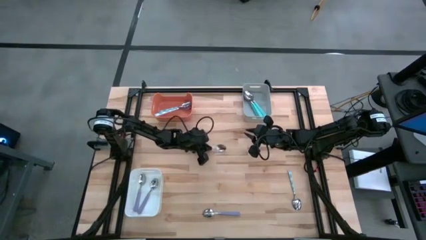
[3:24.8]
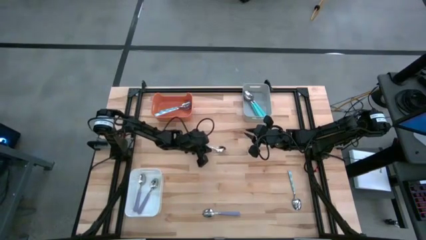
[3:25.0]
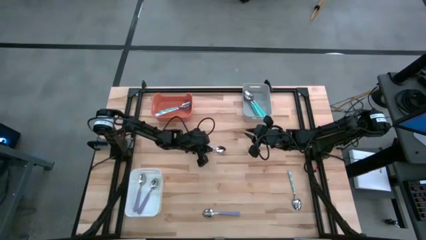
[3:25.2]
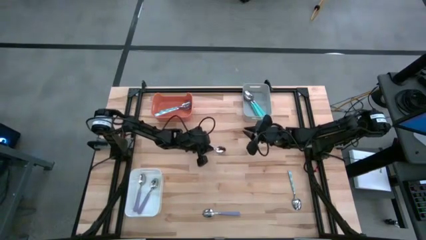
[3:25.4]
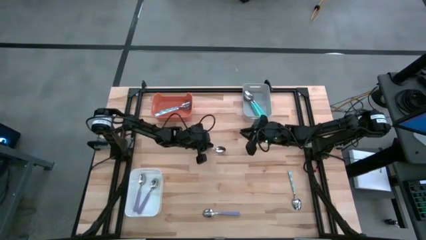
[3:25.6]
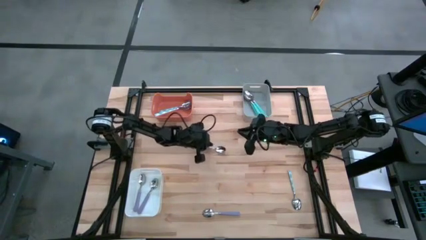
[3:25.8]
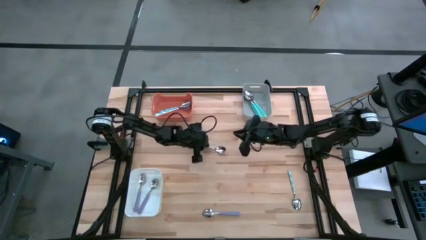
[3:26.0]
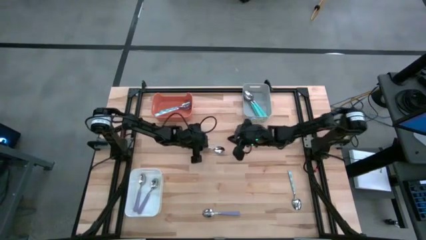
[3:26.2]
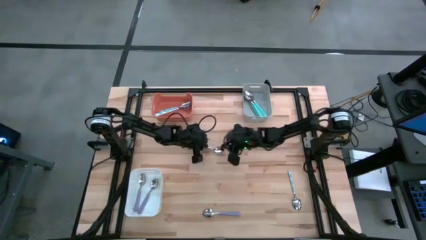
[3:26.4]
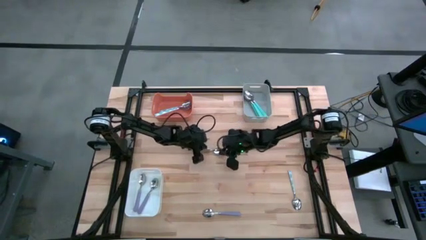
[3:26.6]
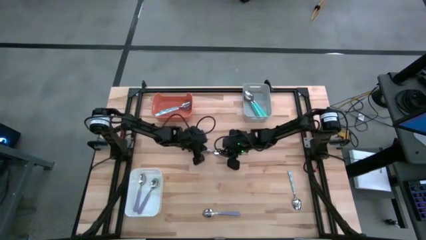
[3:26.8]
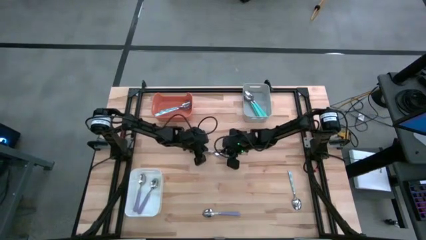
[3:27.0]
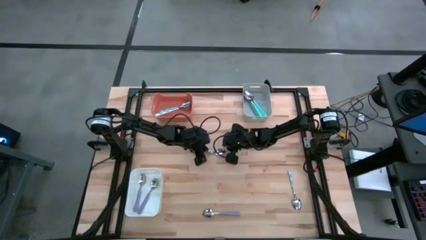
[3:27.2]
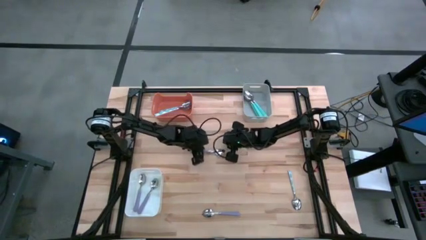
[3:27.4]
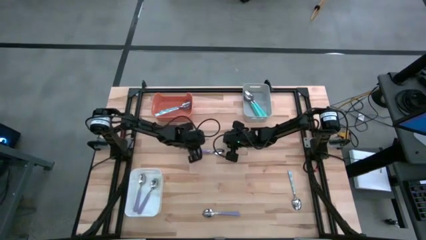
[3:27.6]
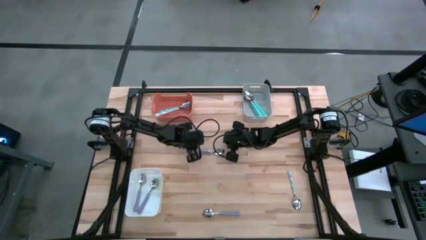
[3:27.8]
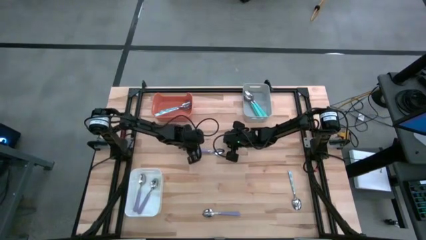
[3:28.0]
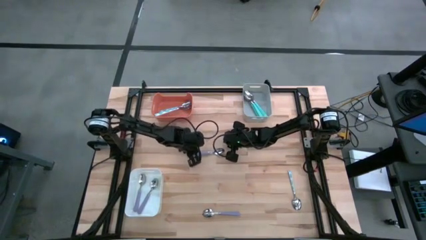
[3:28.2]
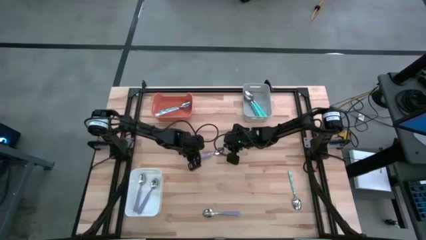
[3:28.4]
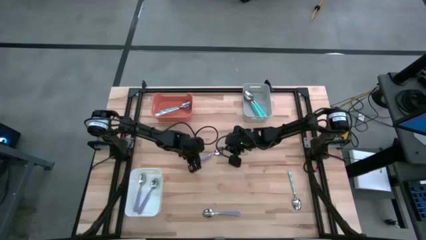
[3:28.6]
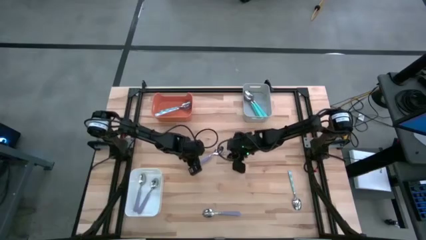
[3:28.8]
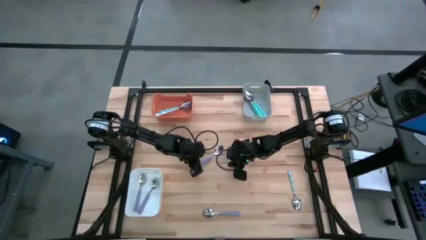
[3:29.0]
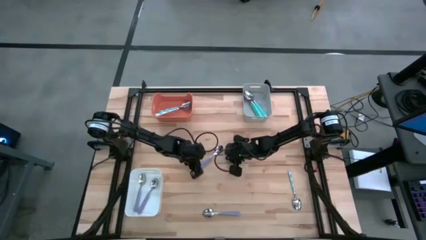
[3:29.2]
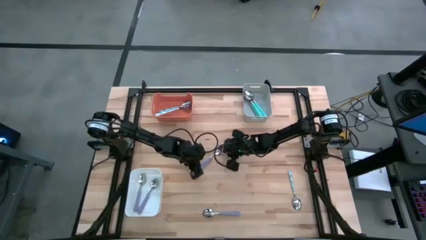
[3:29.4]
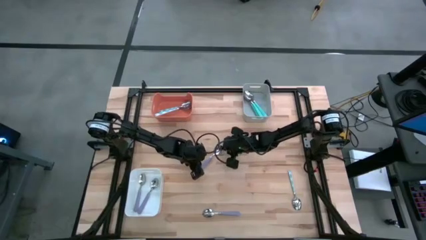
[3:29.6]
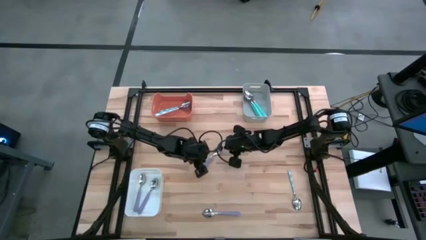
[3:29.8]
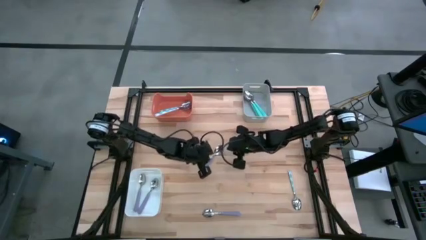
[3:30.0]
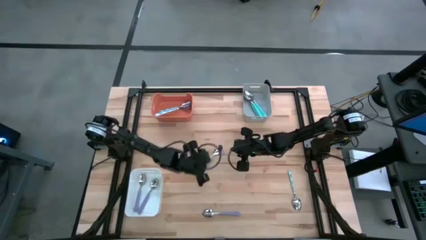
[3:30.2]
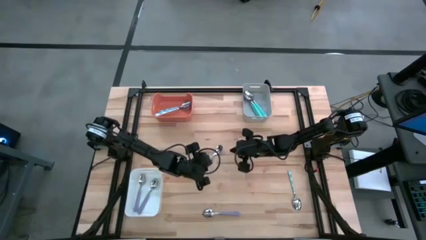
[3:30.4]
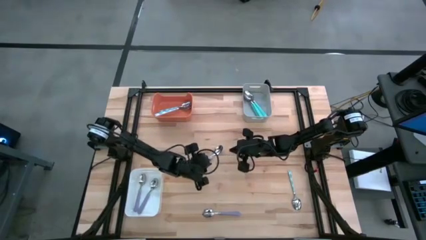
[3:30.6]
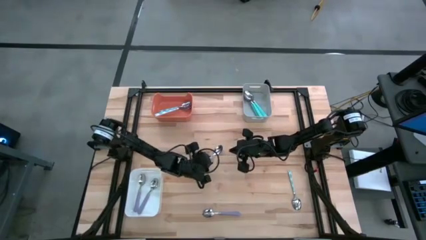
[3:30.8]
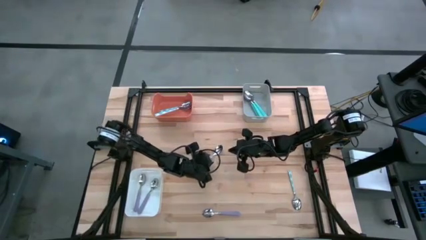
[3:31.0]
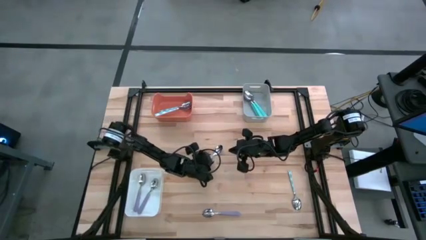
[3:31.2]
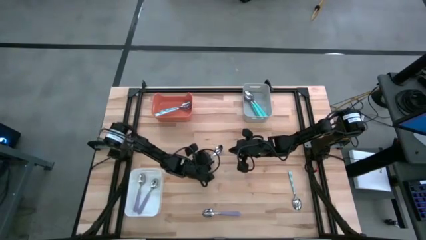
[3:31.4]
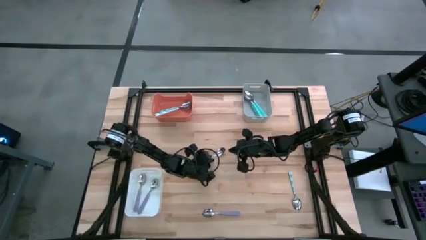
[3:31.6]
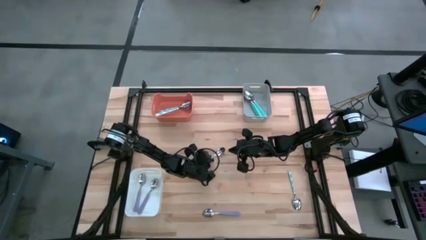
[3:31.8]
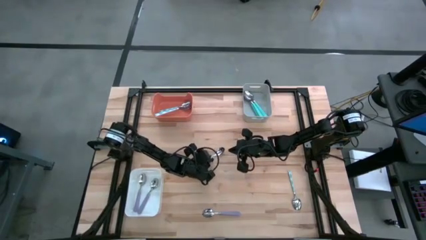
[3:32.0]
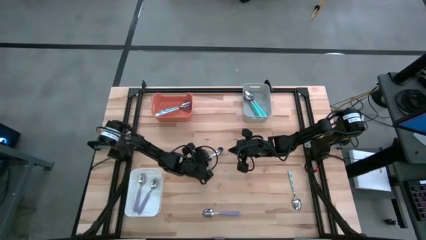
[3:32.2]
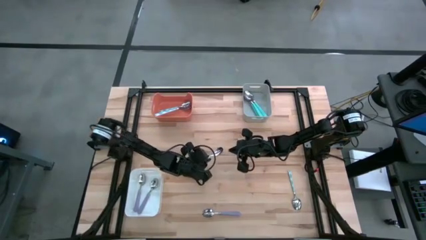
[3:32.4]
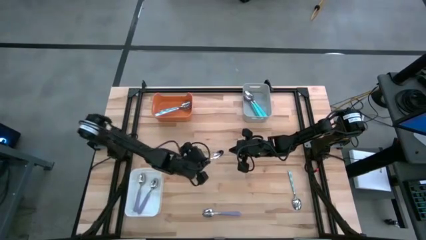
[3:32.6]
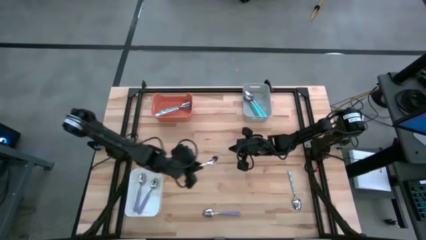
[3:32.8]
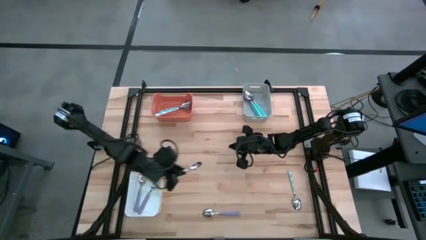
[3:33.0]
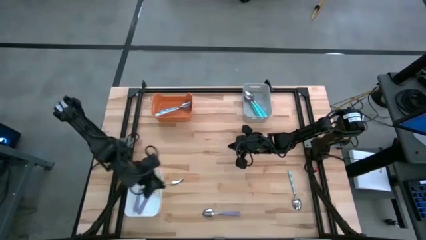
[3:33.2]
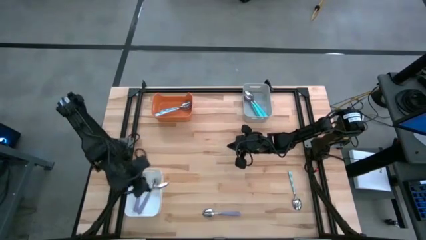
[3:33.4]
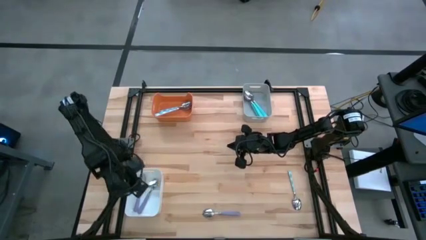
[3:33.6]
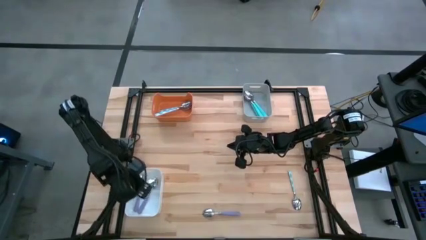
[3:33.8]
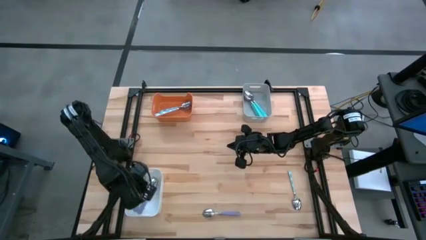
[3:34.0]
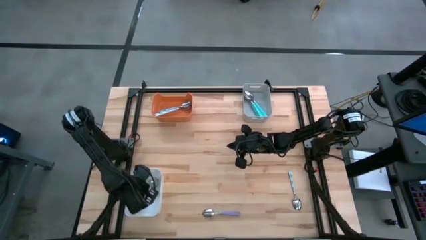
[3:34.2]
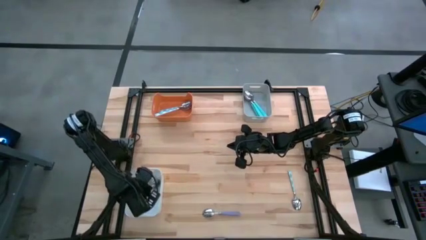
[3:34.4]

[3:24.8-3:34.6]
Task: Sort silverware by color (type)
Put the left purple spoon into the white bin

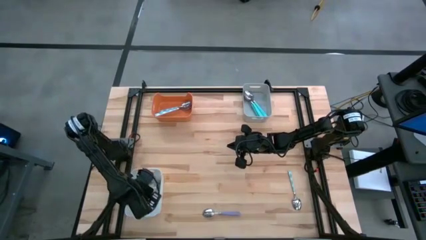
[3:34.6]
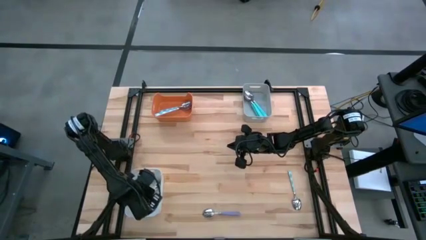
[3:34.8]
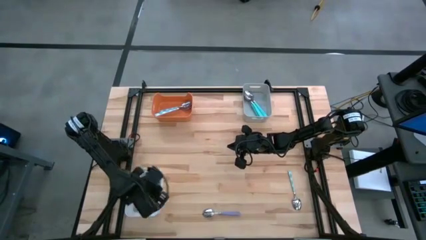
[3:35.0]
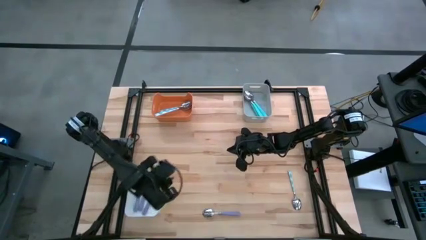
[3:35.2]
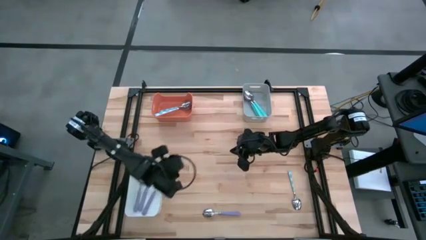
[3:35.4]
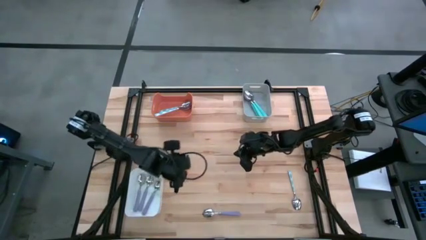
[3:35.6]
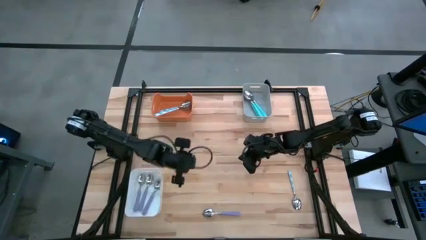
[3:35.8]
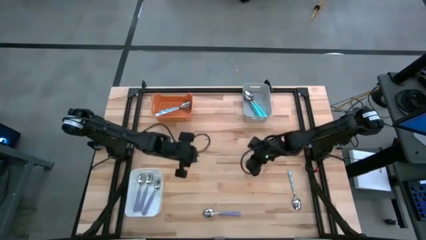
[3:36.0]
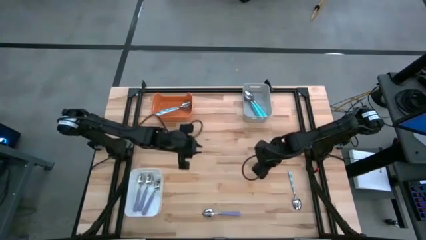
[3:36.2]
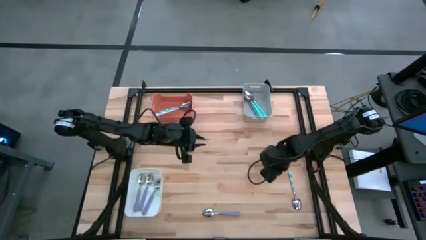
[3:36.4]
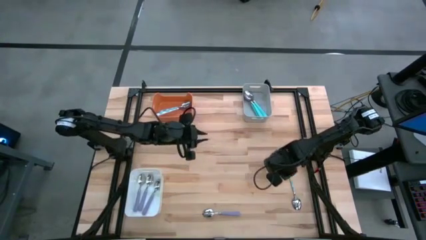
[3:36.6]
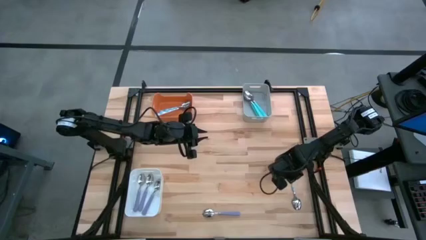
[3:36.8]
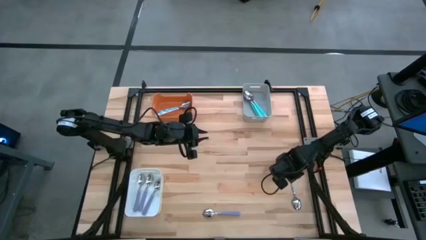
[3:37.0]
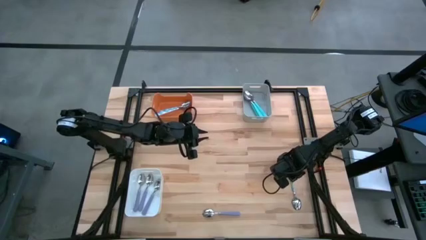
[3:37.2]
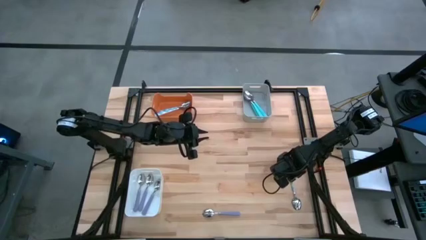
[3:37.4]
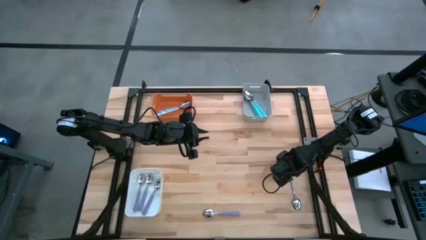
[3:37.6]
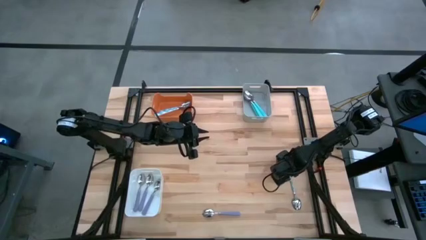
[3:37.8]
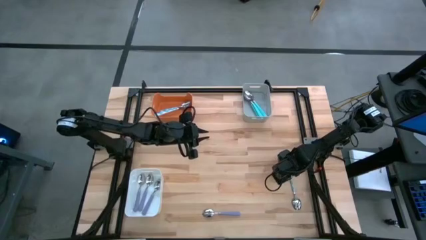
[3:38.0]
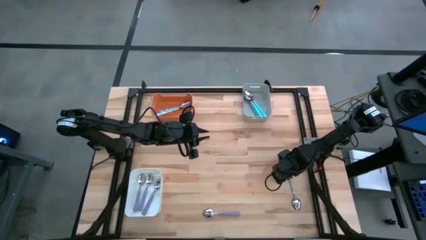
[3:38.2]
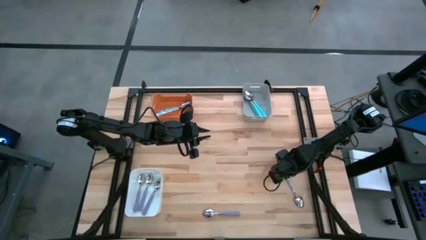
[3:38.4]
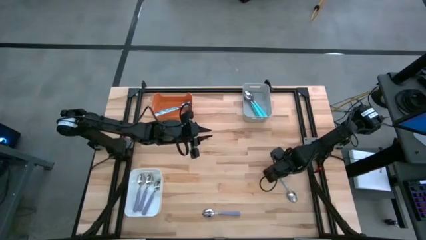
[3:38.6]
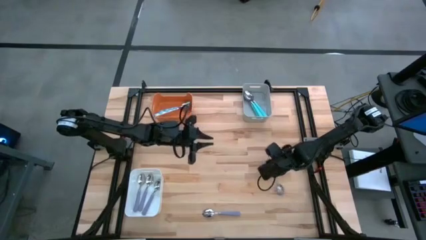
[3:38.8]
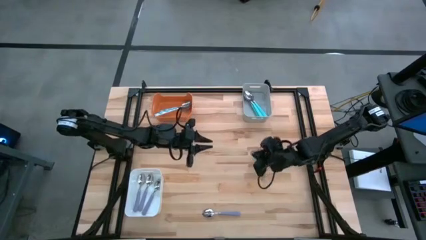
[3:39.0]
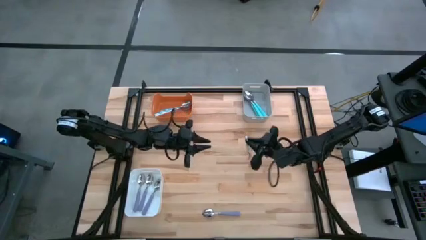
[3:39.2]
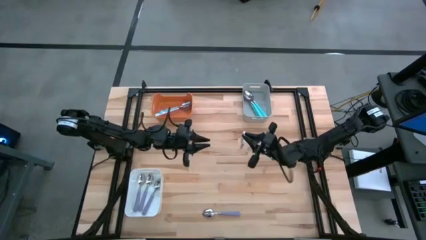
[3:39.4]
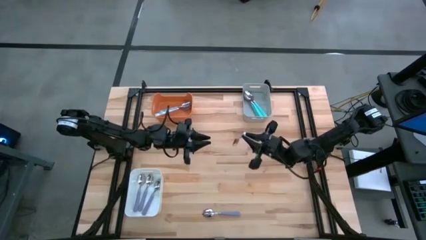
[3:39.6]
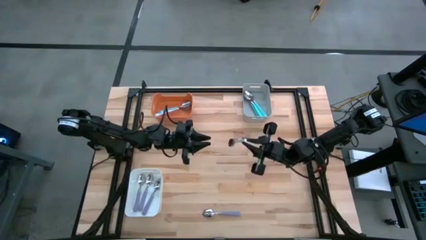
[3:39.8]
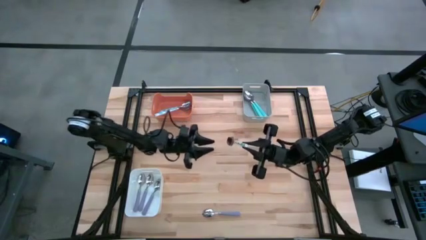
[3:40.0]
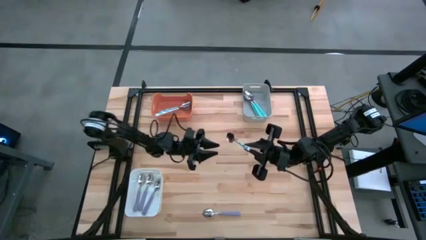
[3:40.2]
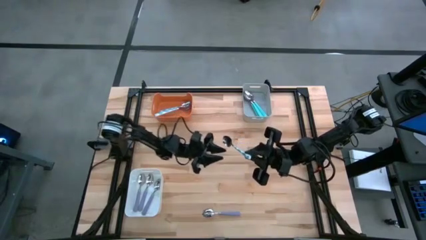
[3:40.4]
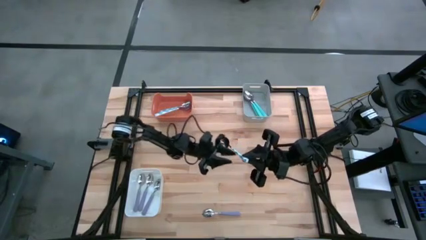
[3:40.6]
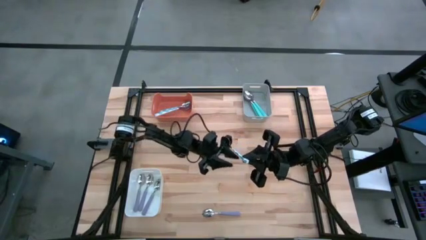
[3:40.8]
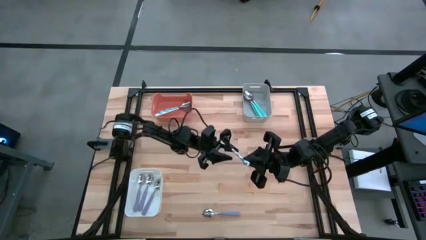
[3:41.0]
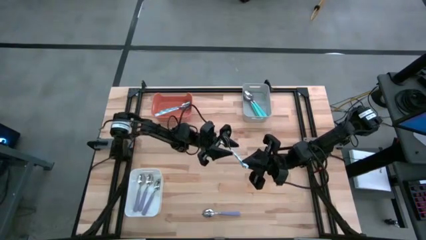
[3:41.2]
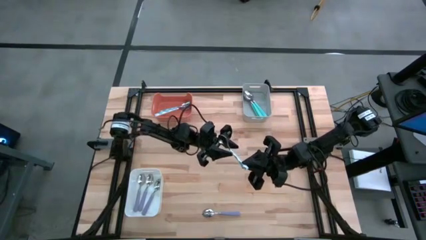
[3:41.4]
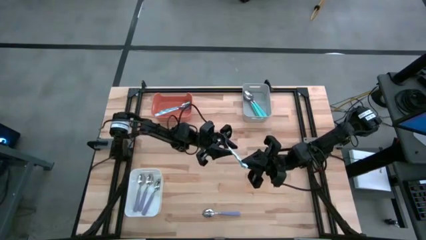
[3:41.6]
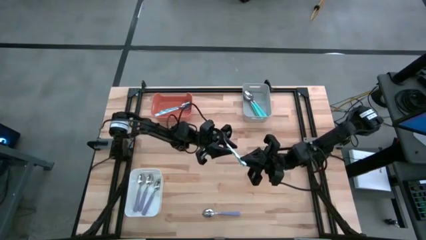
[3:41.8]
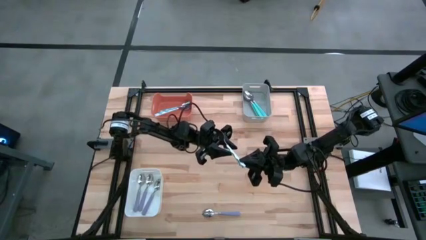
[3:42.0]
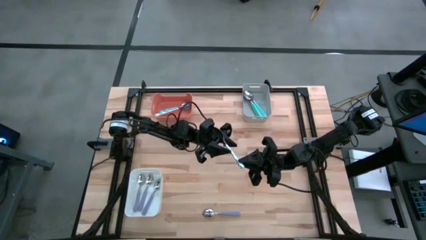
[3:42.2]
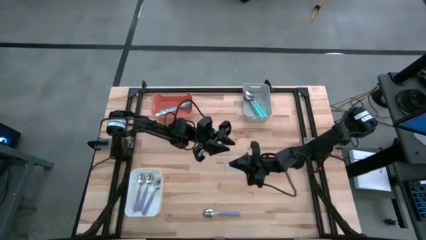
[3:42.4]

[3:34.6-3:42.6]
Put the blue patterned spoon into the orange bin
